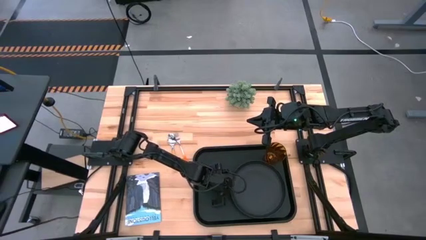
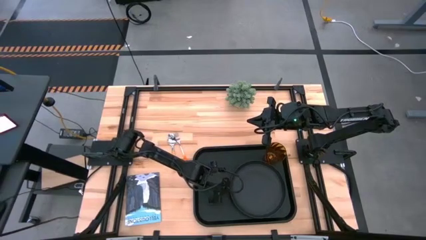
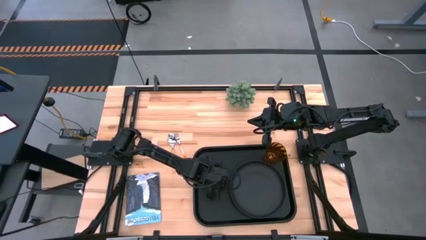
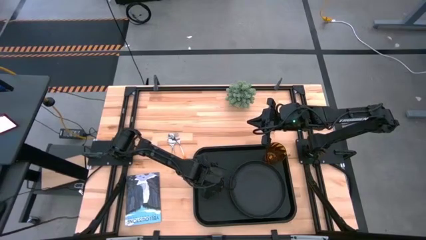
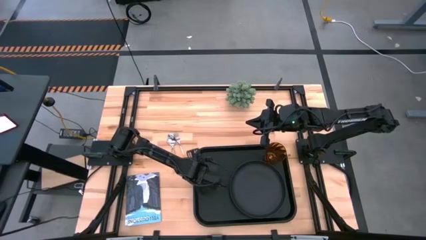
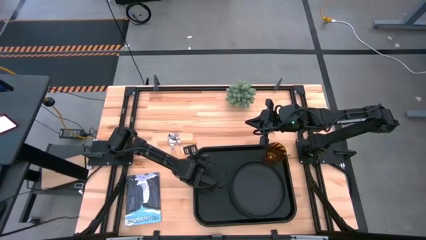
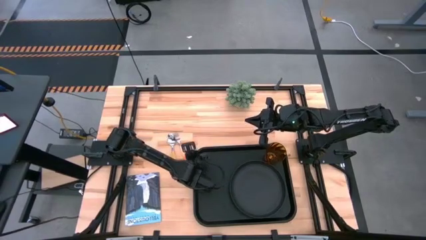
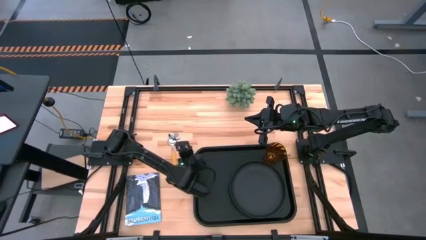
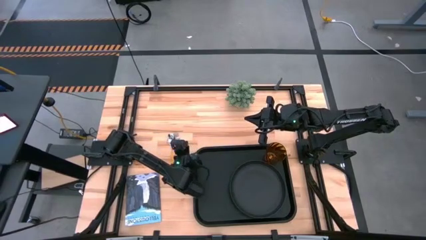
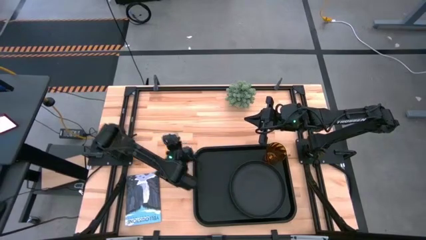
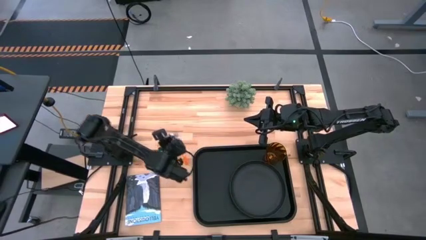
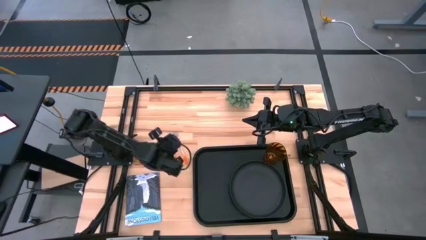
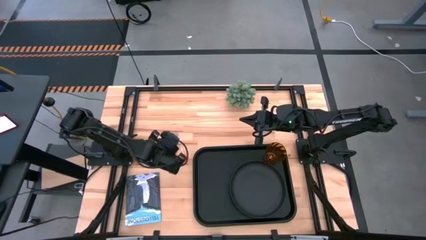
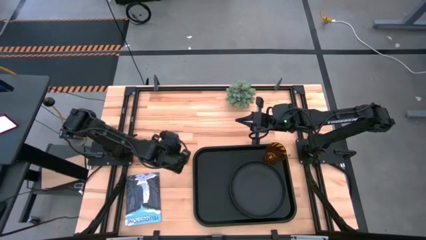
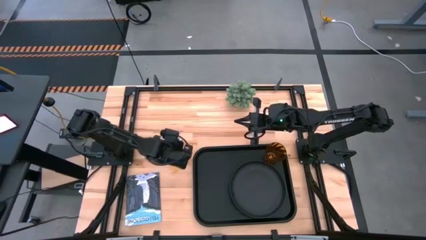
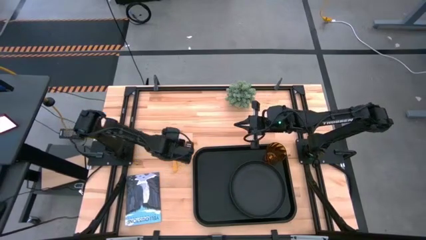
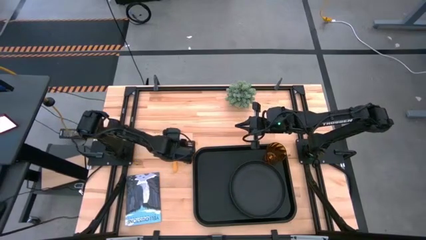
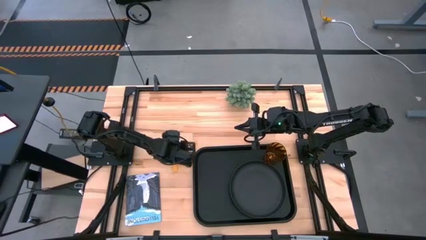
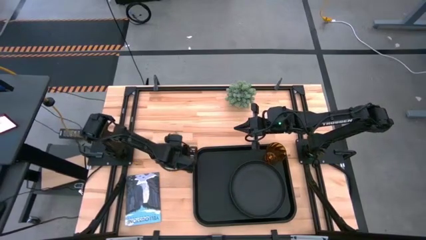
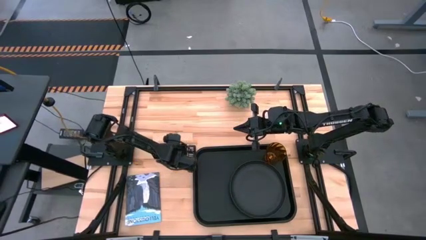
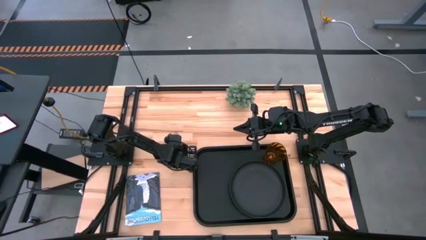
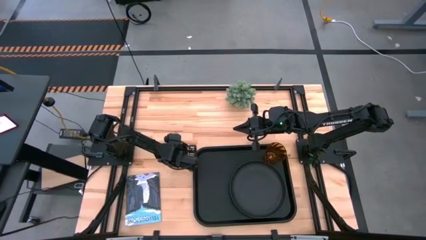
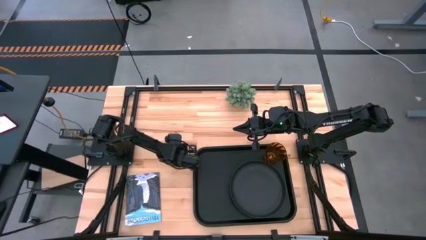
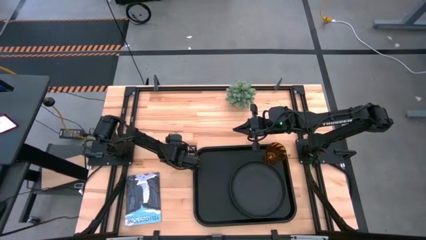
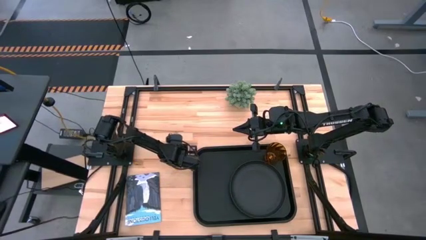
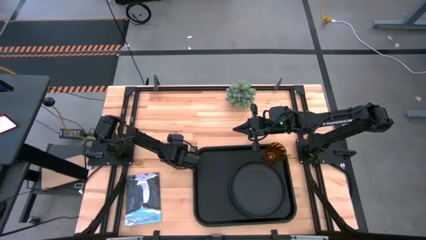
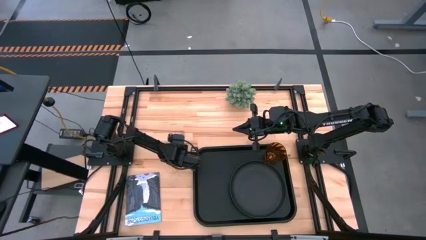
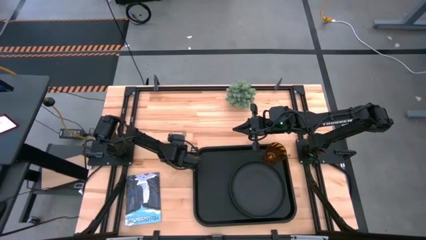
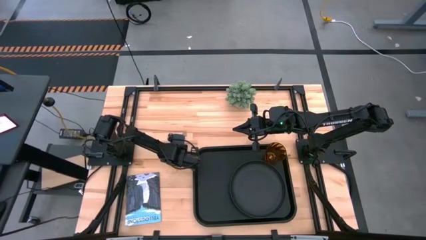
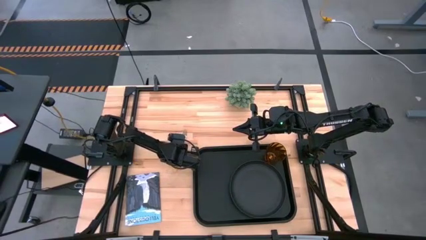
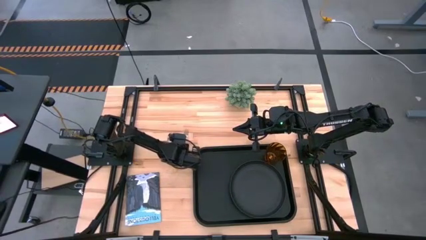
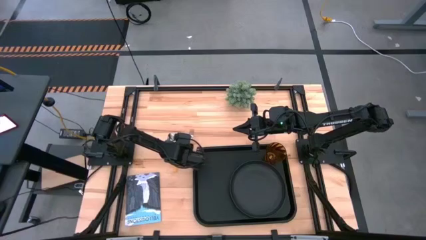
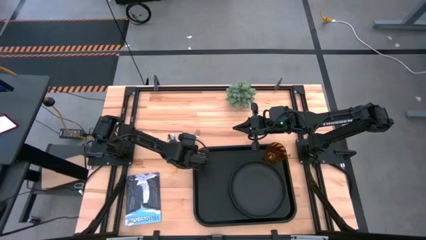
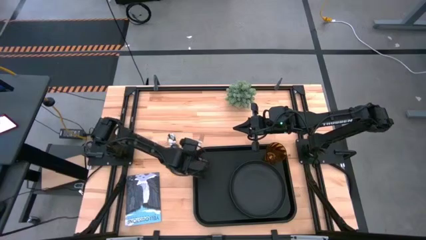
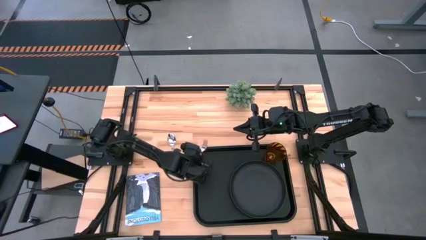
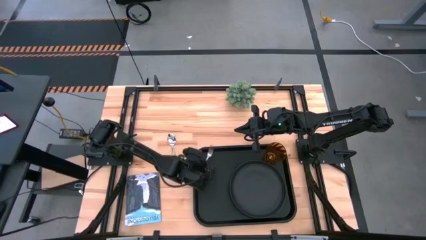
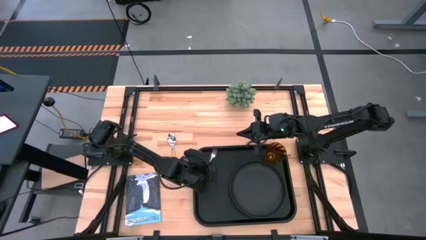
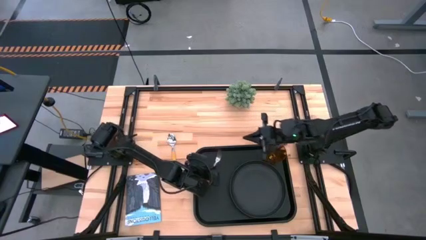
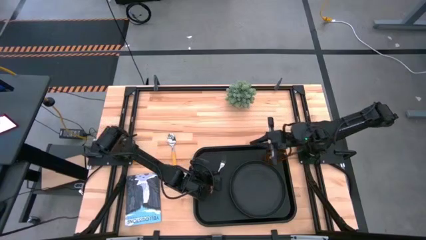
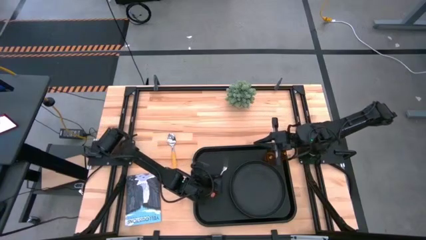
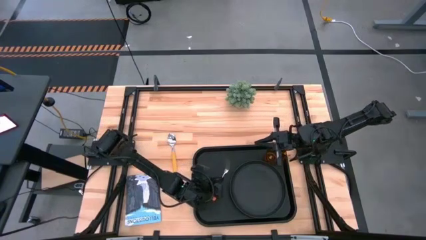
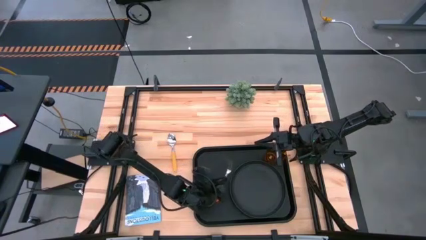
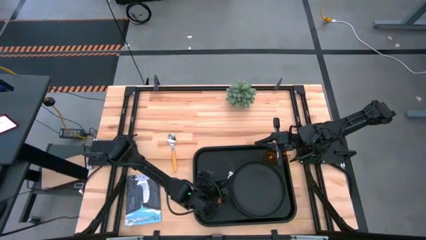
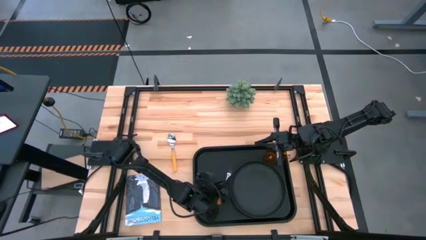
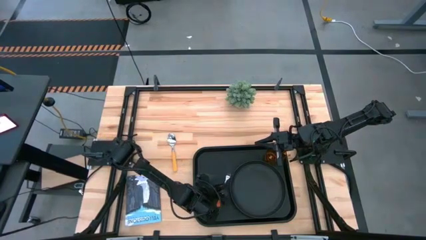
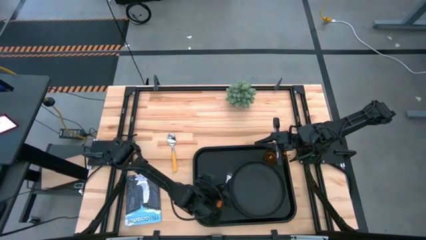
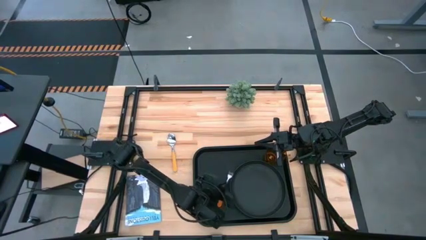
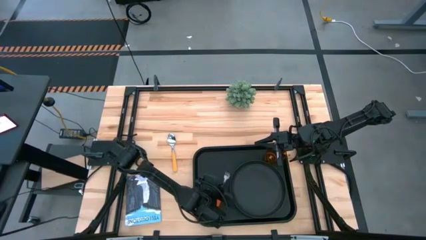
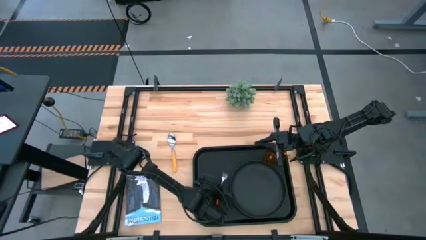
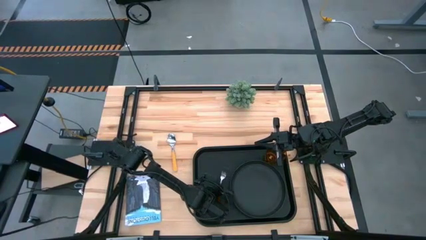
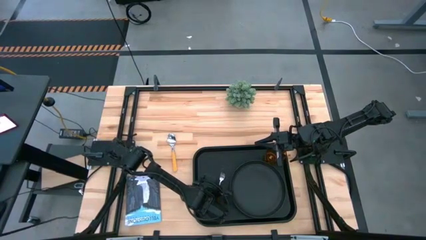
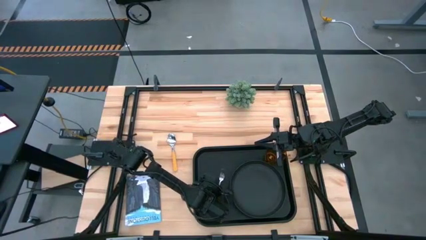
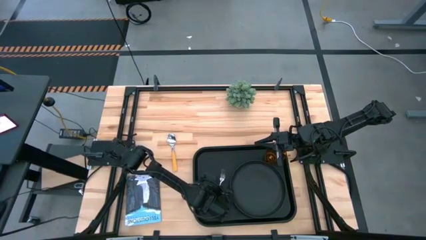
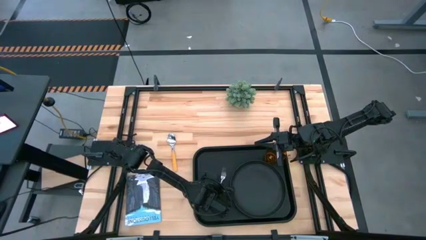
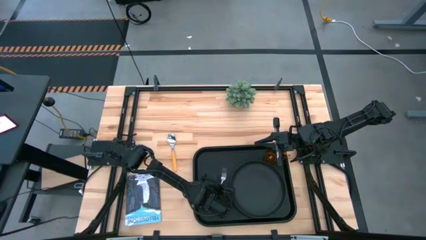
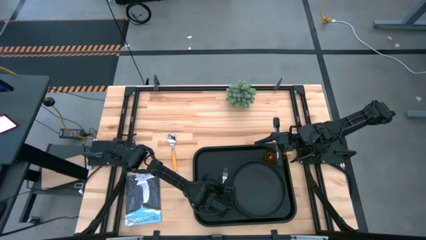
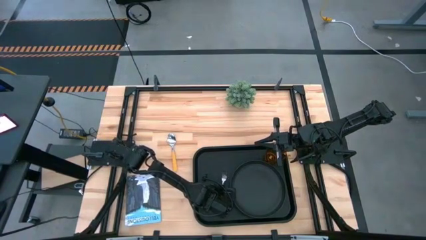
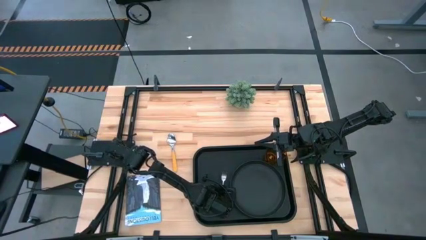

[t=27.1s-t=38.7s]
Task: Pick and place plate/cup/fork/spoon on tray
Put the orange fork on the black serving tray to the left of the black plate
